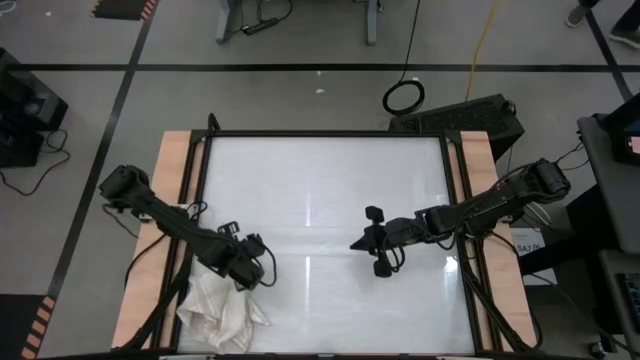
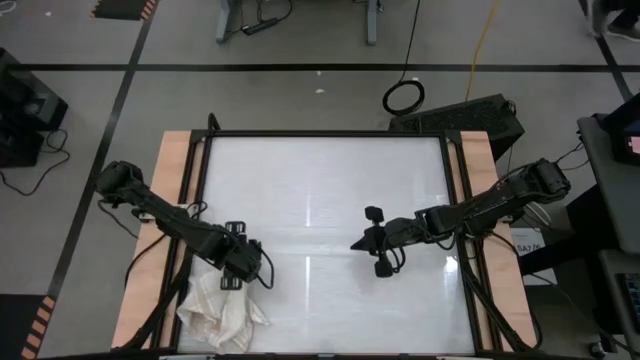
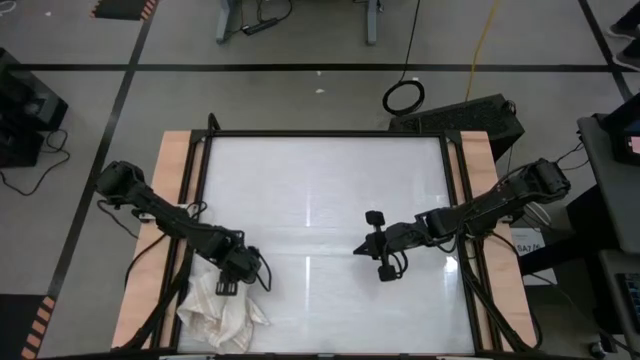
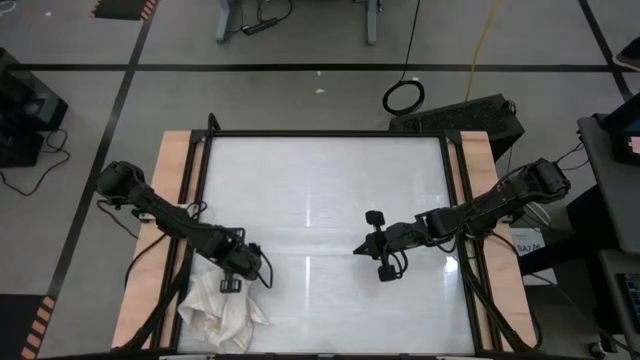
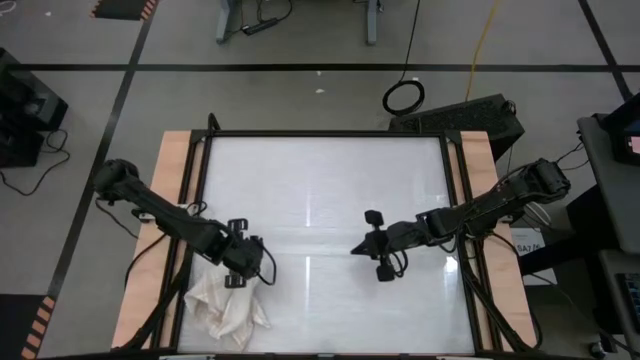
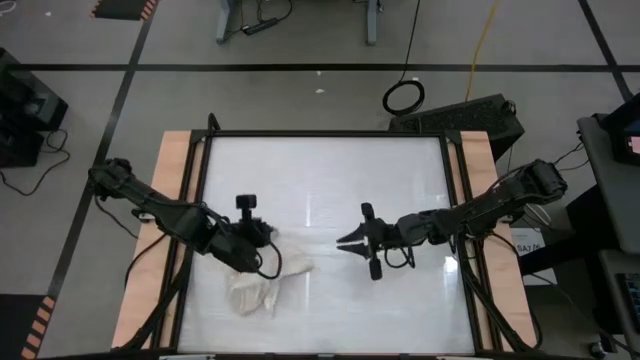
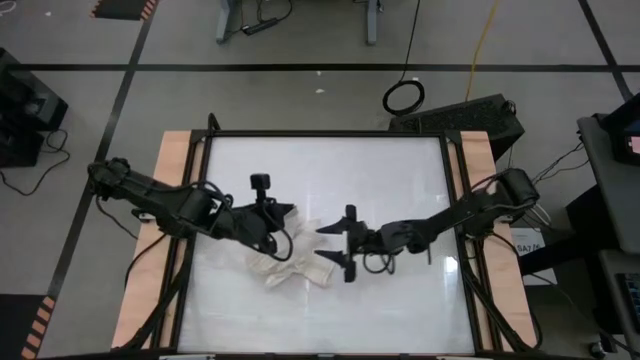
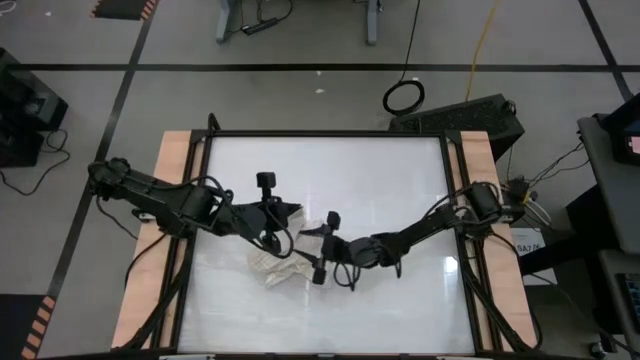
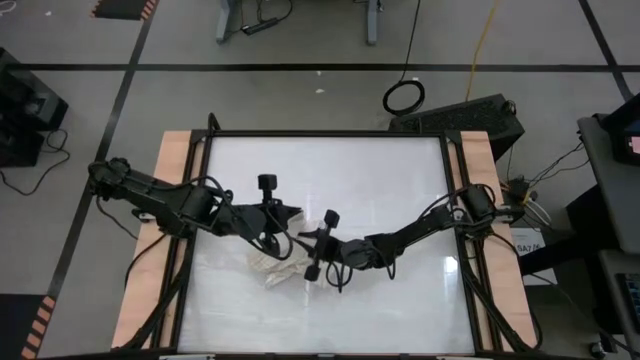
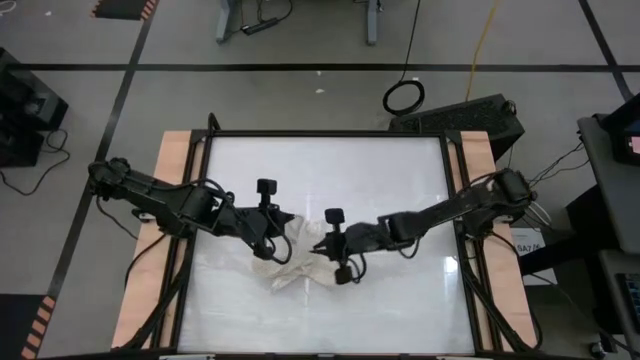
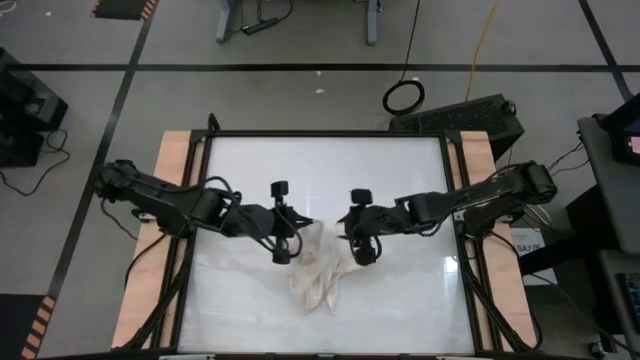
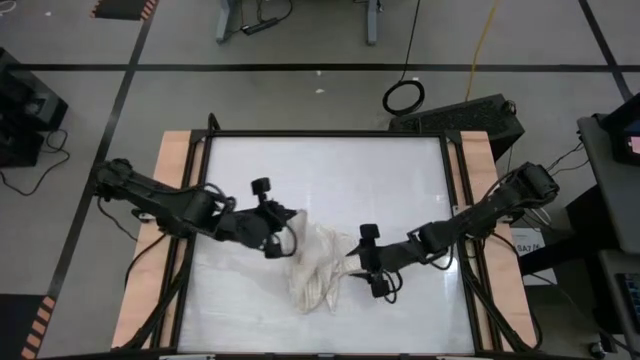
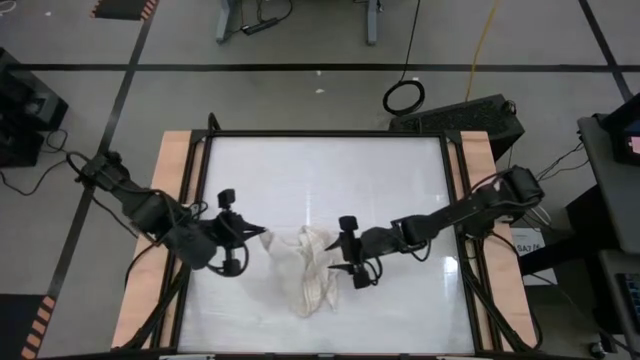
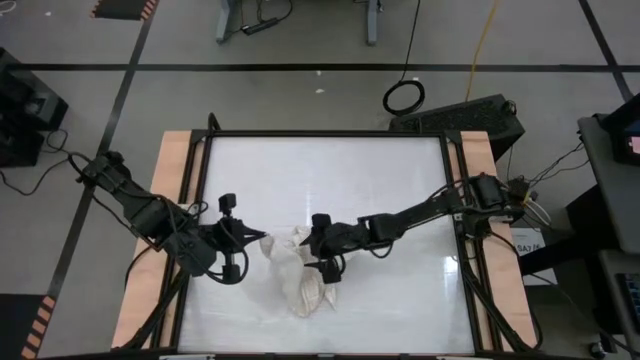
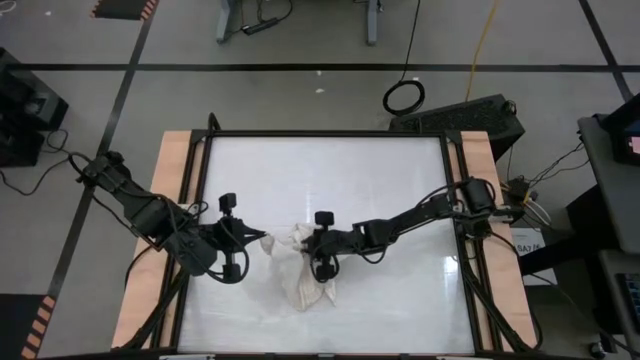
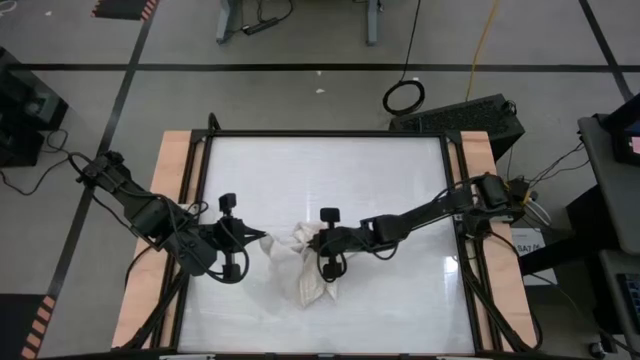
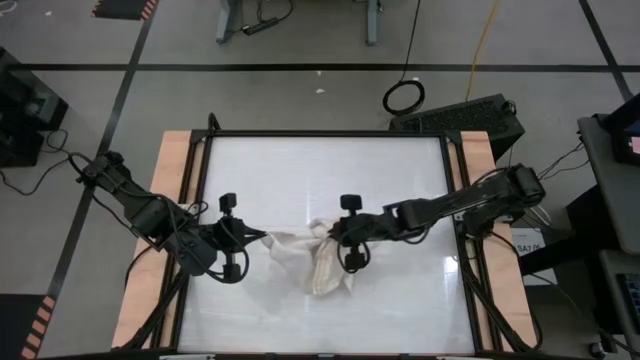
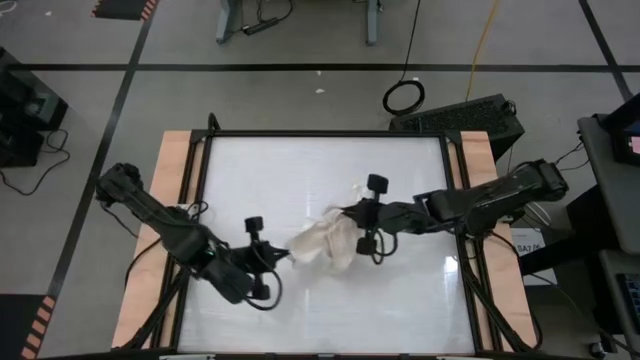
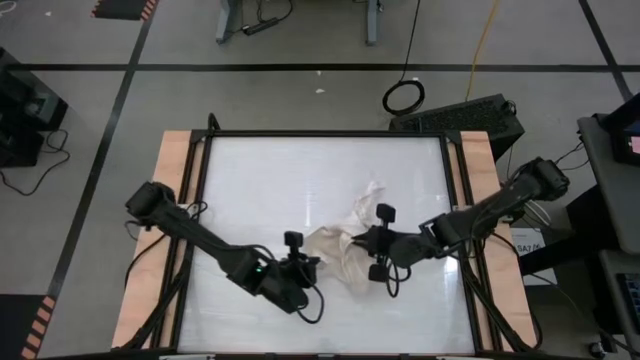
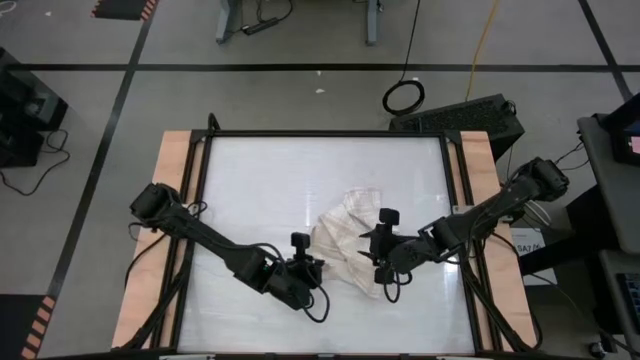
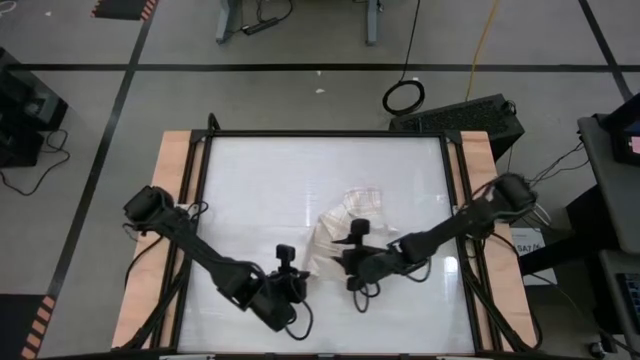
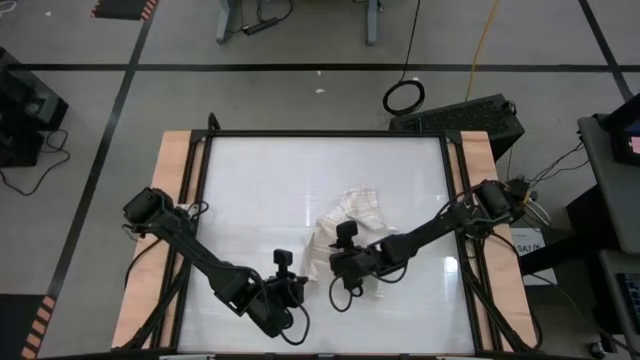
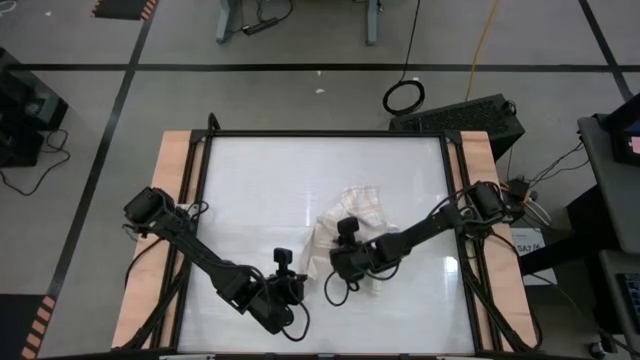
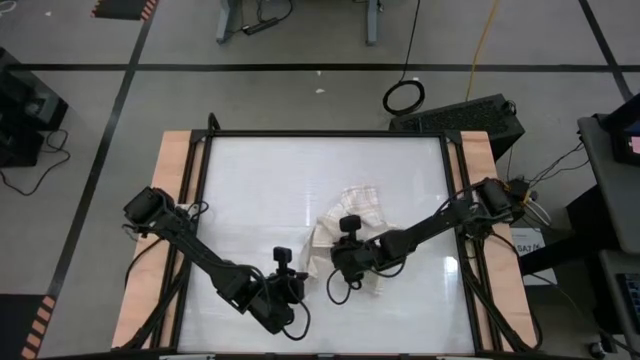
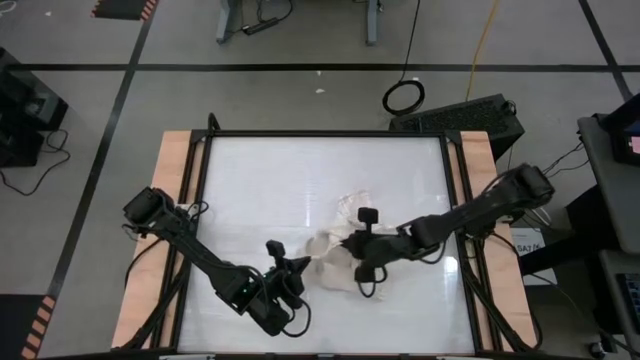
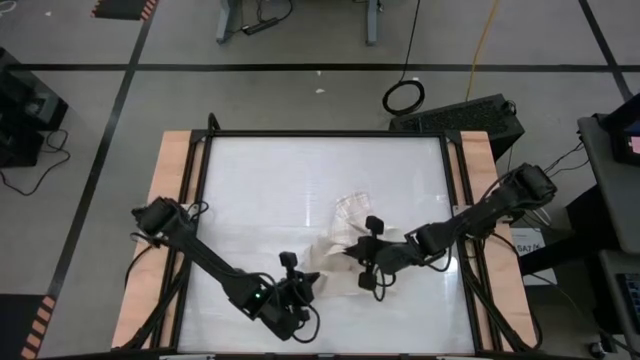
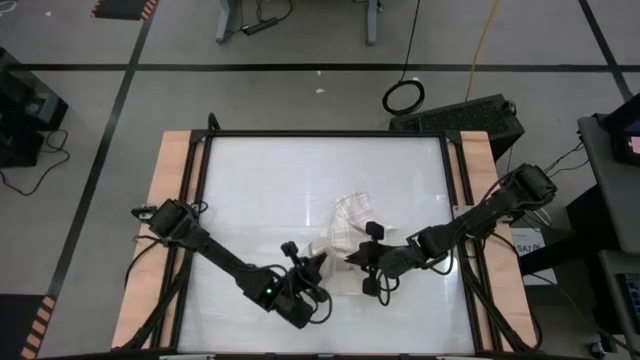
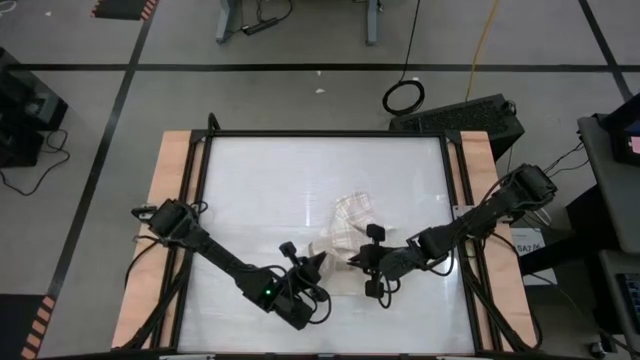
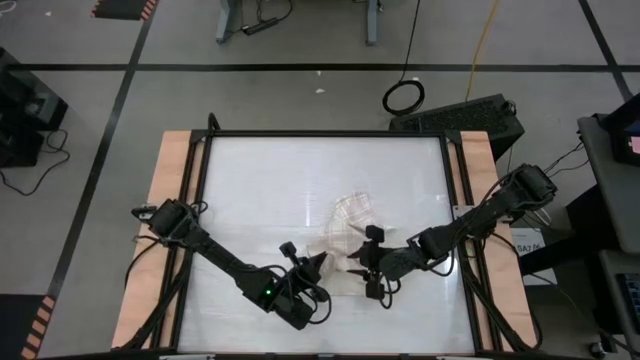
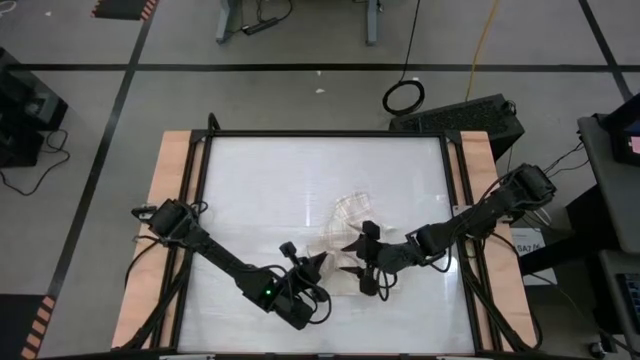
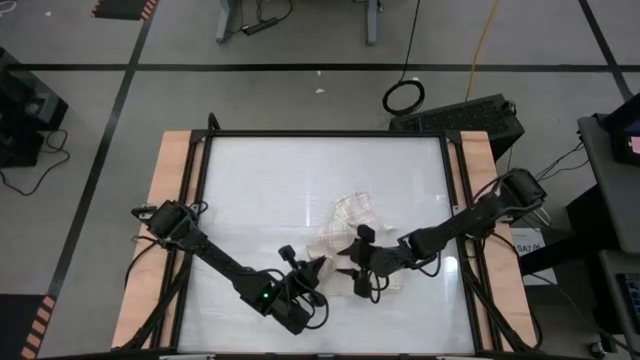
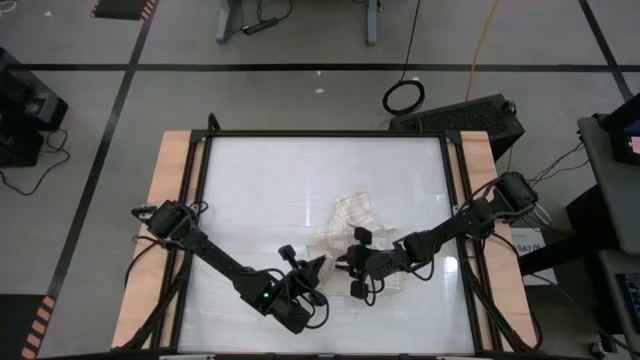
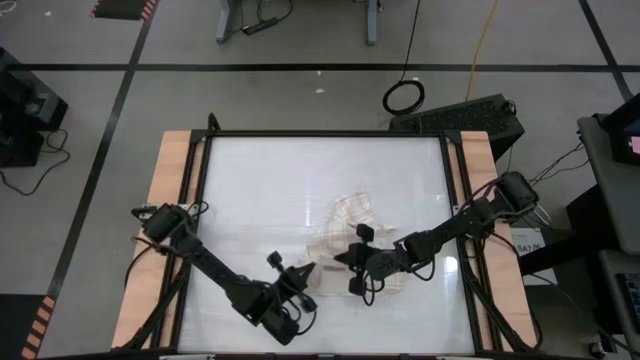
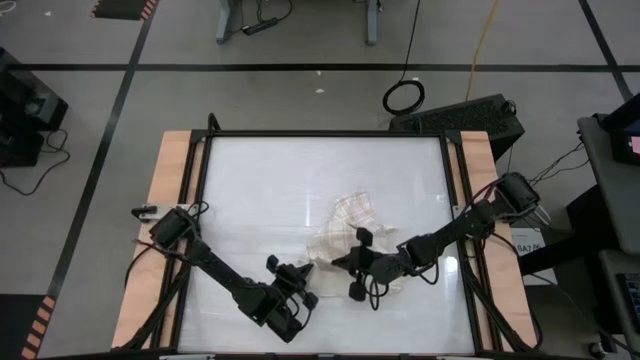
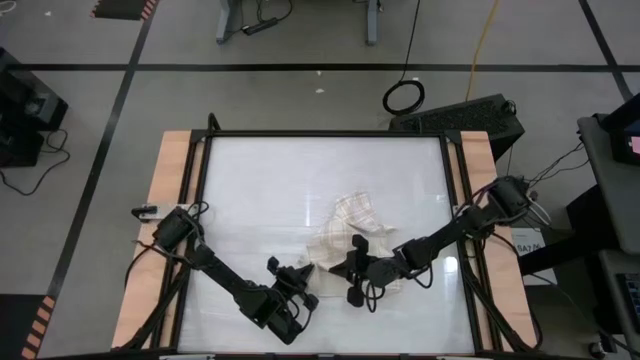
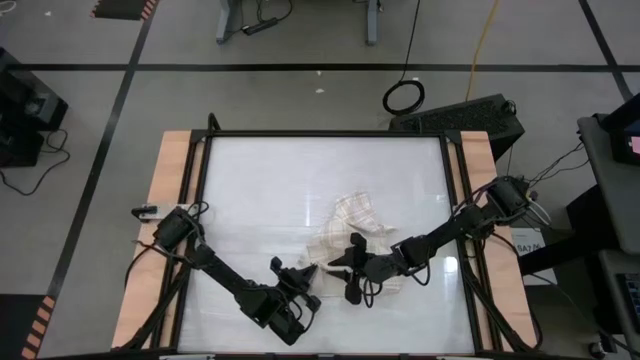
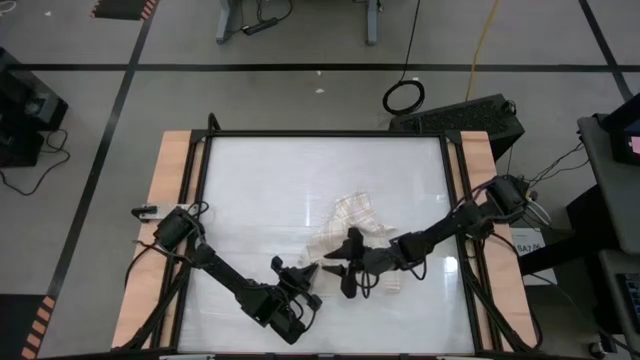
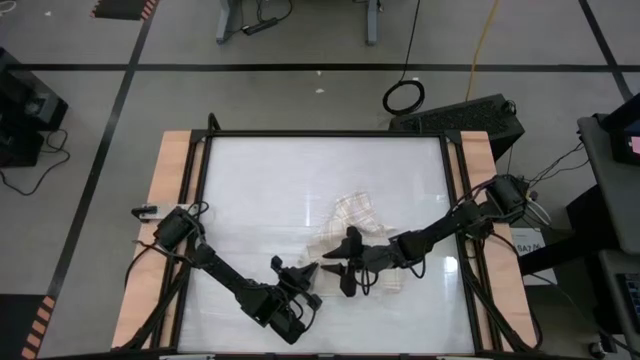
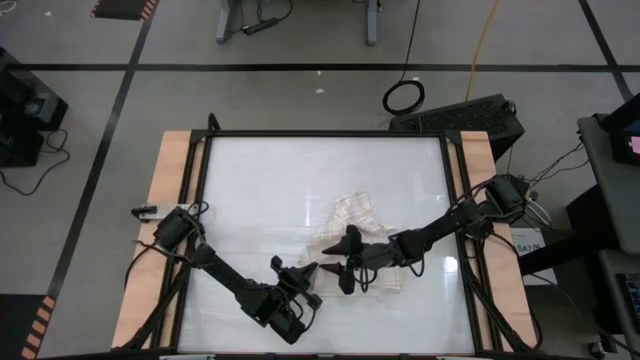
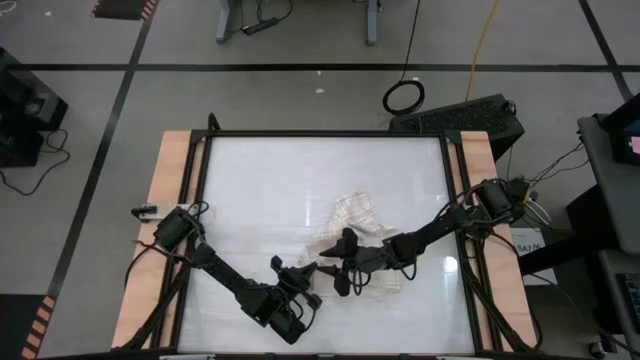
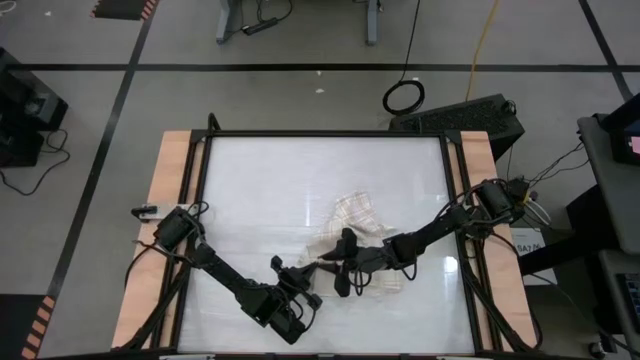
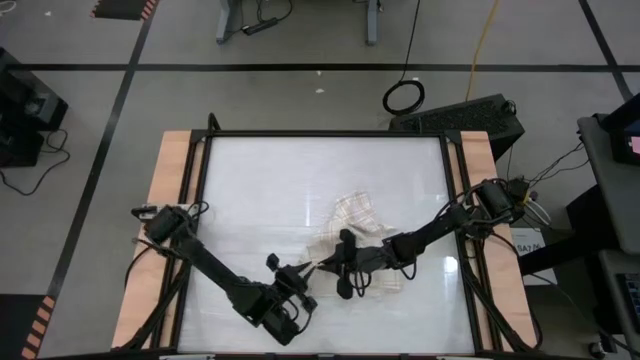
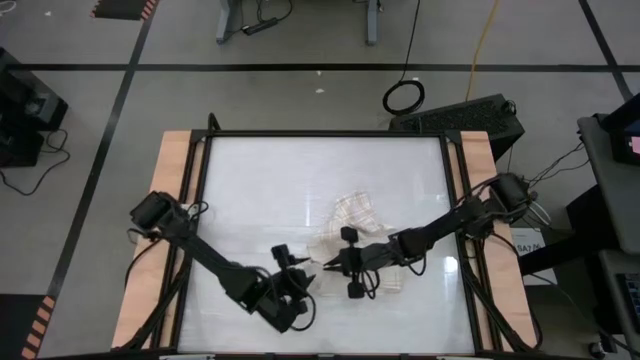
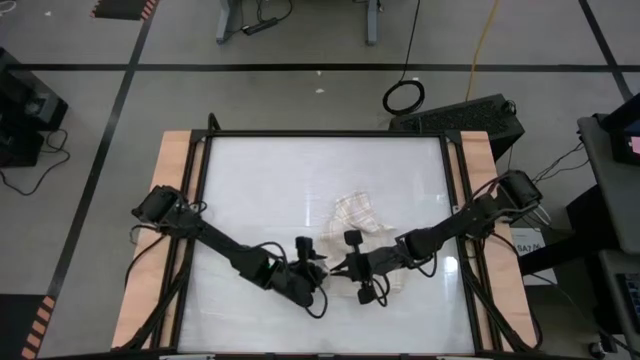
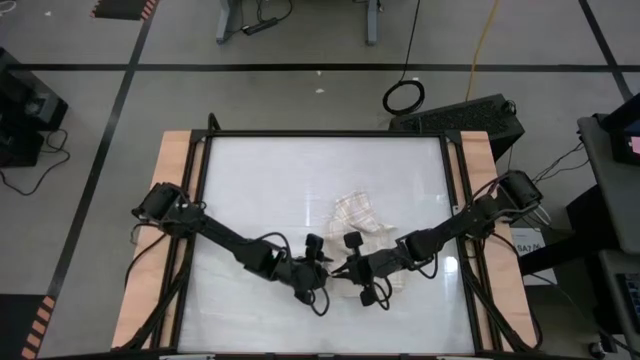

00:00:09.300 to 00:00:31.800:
Task: Roll towel
Roll the white towel
